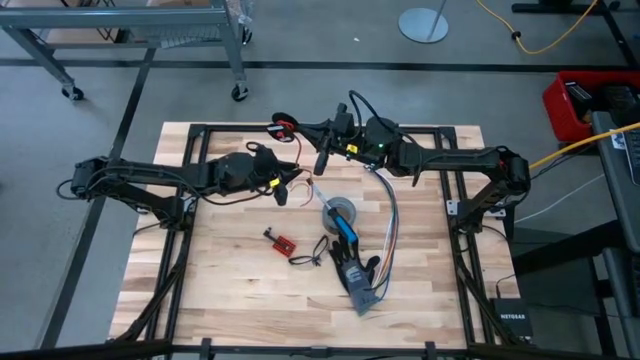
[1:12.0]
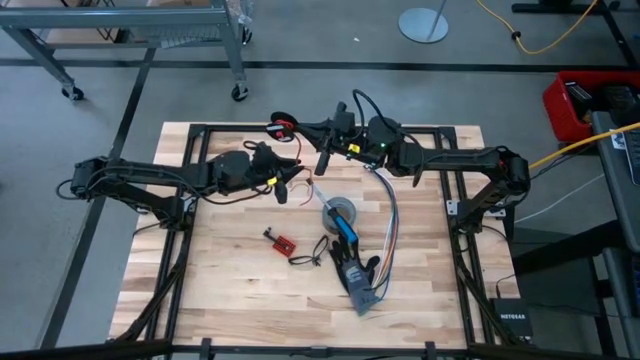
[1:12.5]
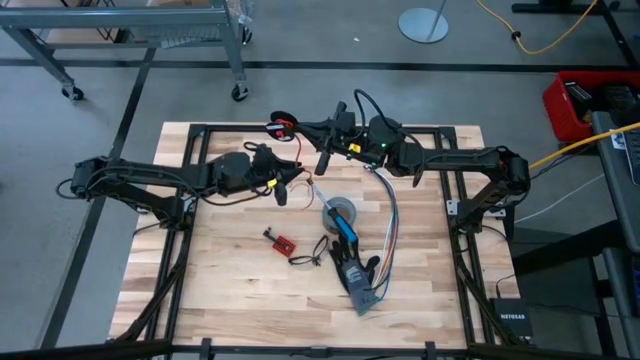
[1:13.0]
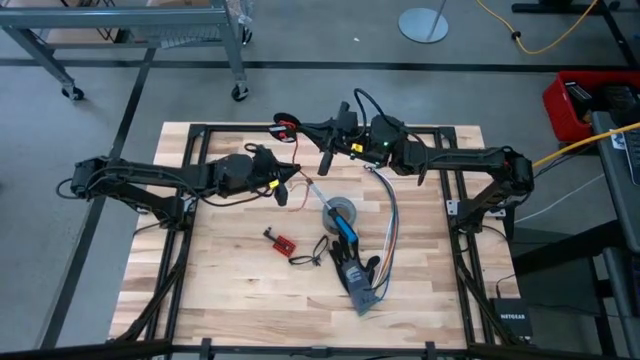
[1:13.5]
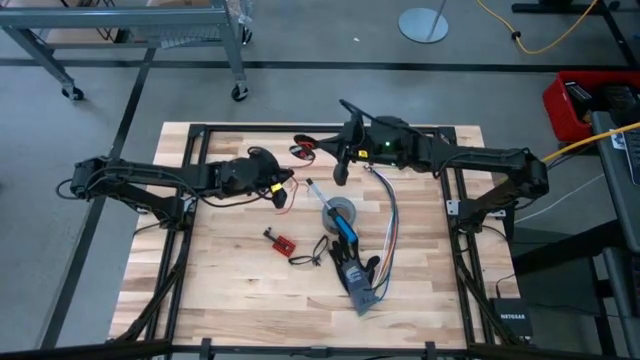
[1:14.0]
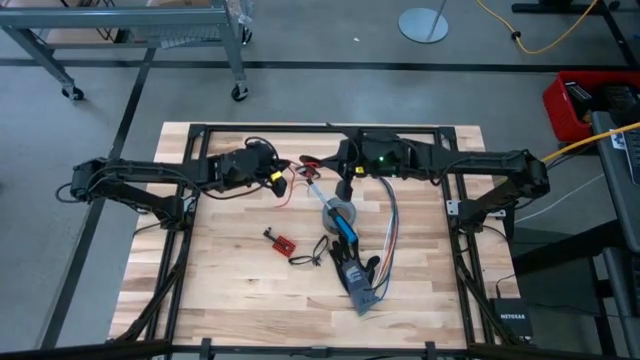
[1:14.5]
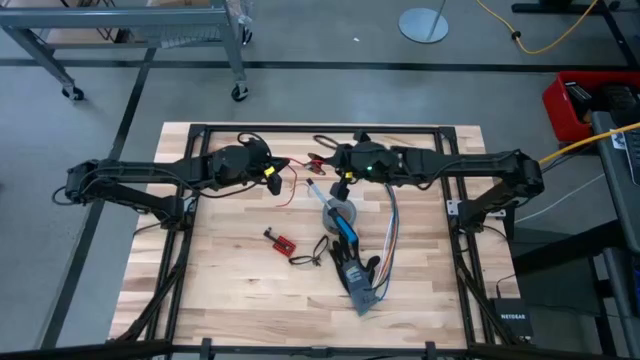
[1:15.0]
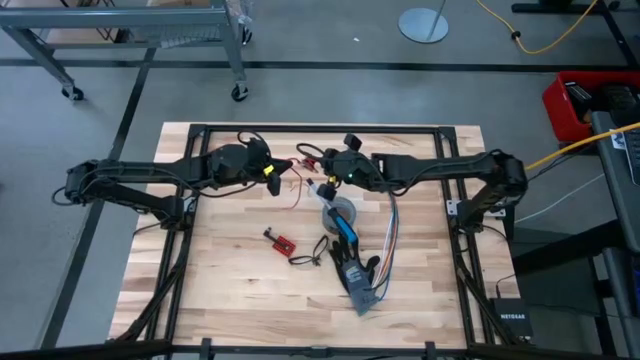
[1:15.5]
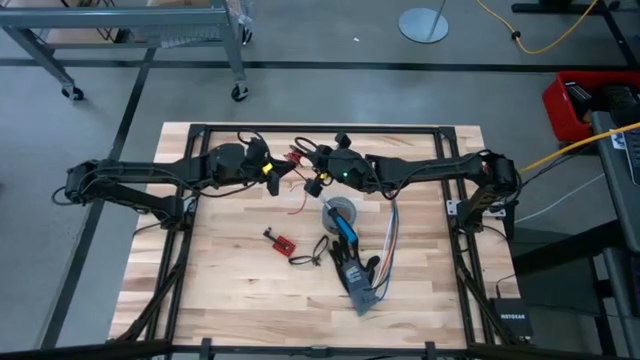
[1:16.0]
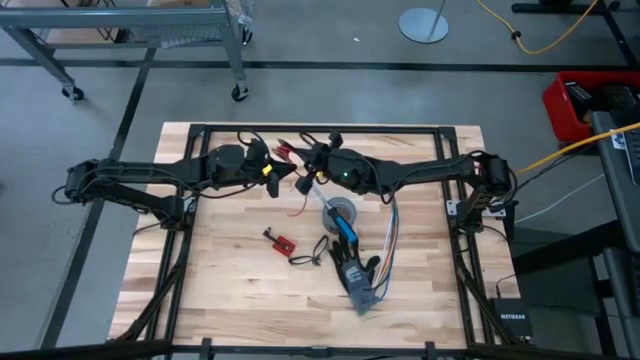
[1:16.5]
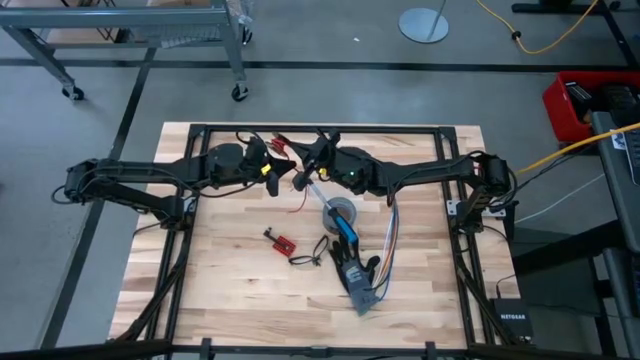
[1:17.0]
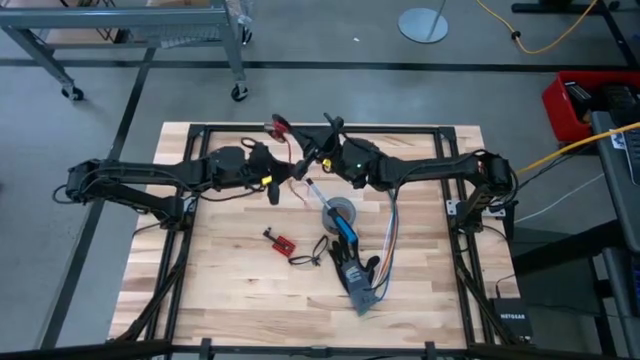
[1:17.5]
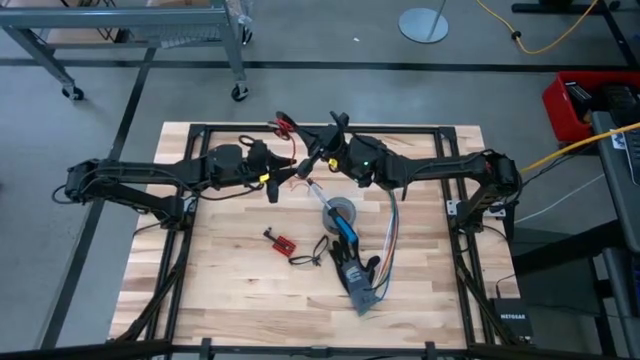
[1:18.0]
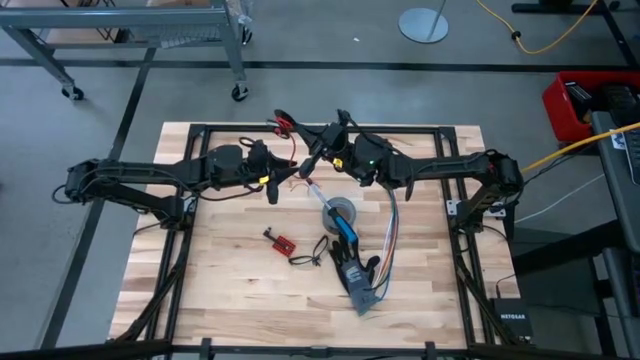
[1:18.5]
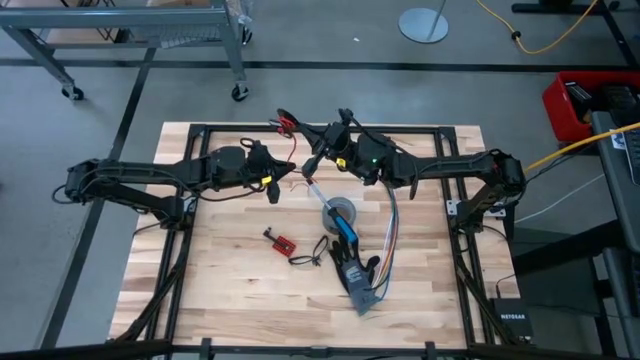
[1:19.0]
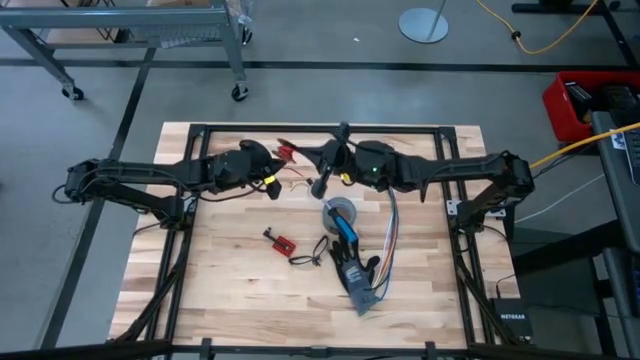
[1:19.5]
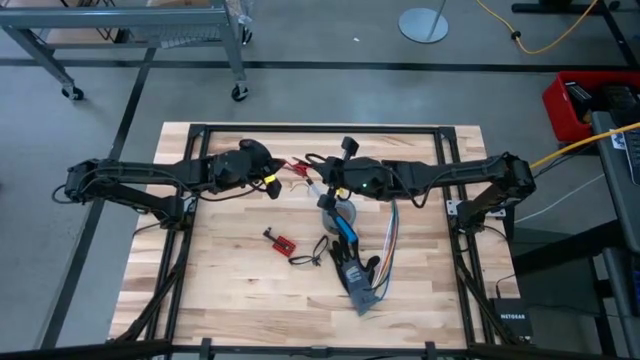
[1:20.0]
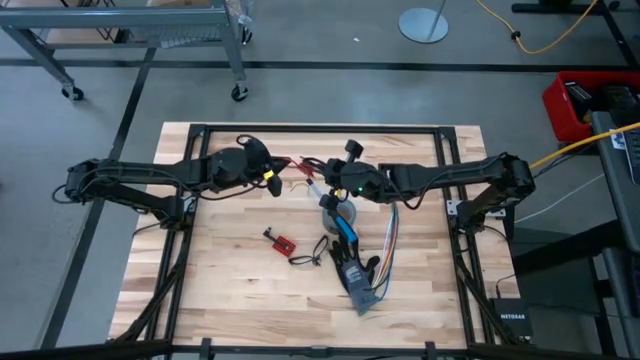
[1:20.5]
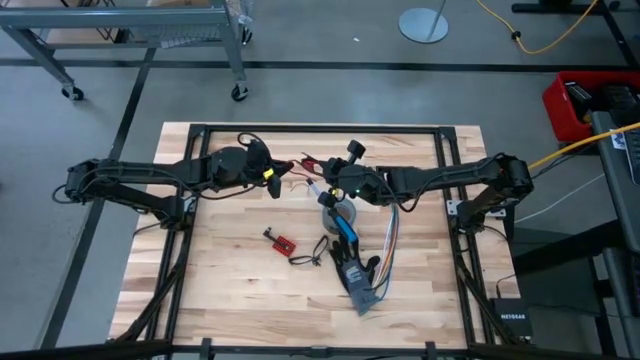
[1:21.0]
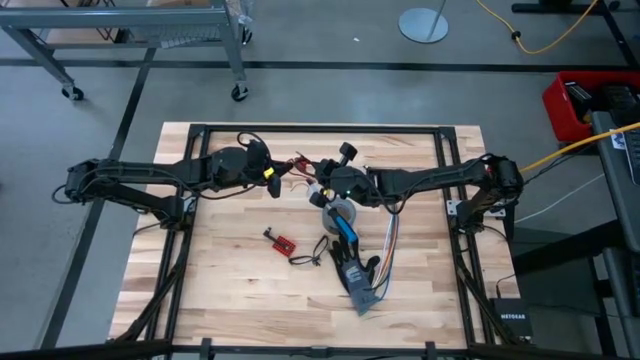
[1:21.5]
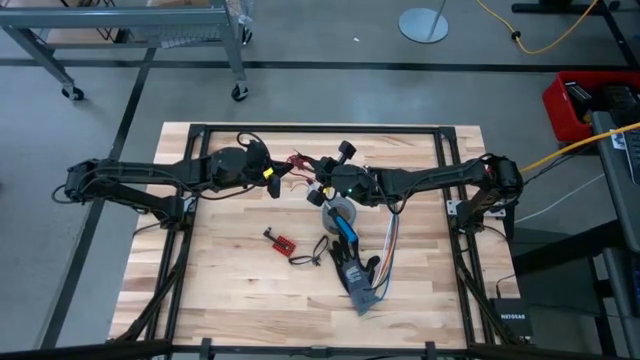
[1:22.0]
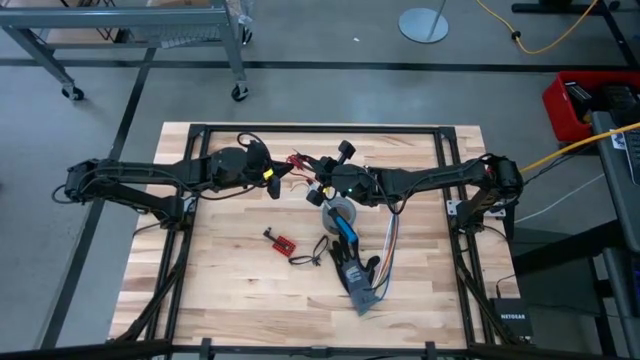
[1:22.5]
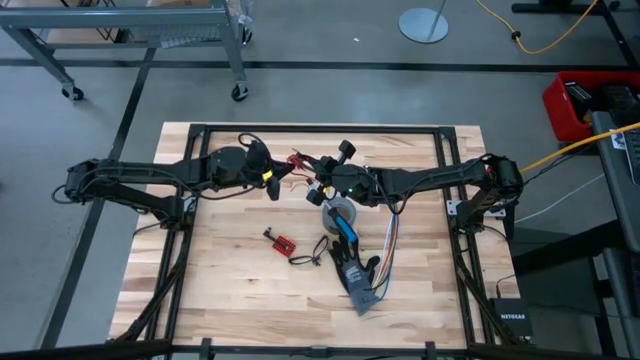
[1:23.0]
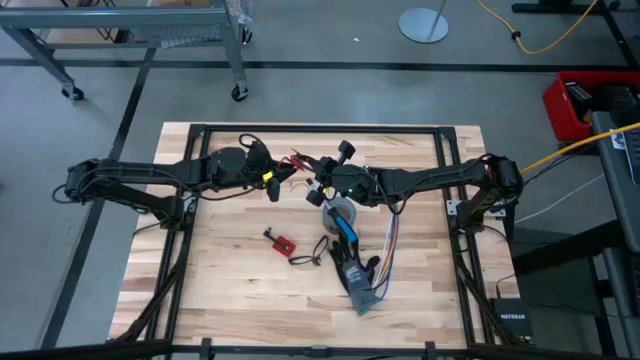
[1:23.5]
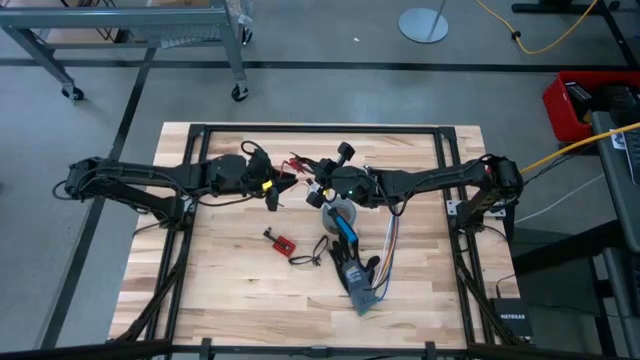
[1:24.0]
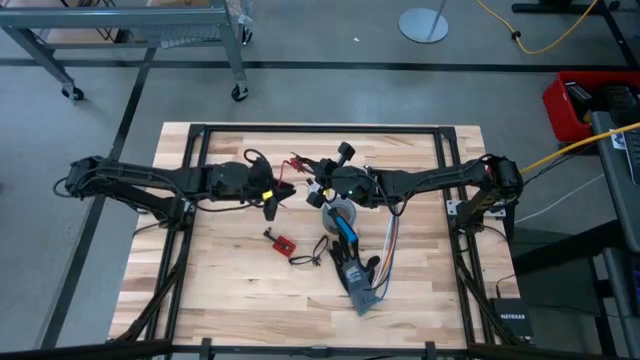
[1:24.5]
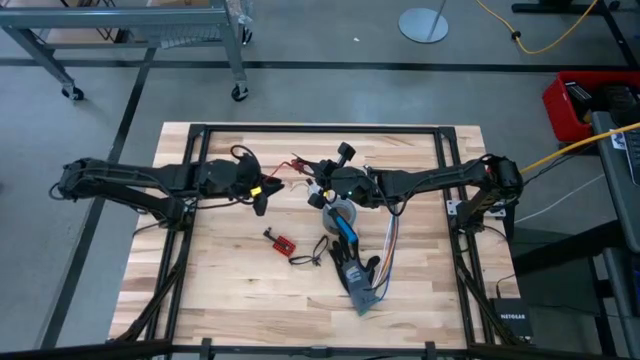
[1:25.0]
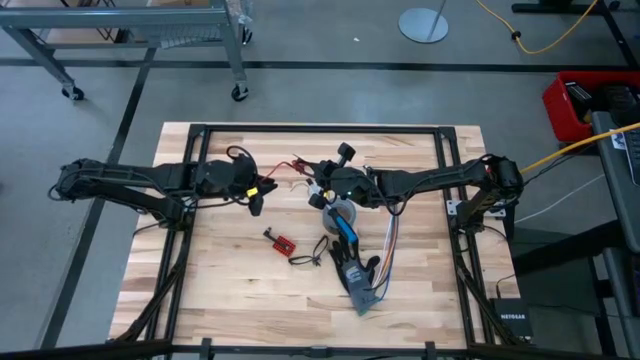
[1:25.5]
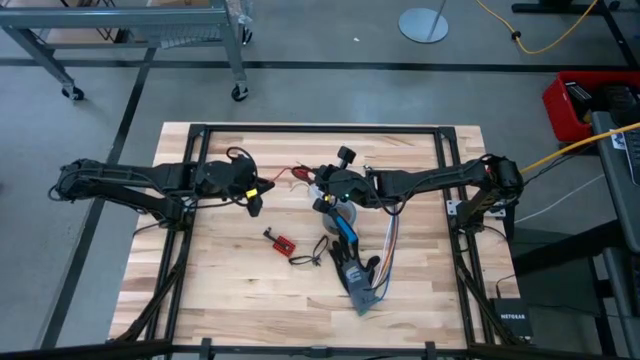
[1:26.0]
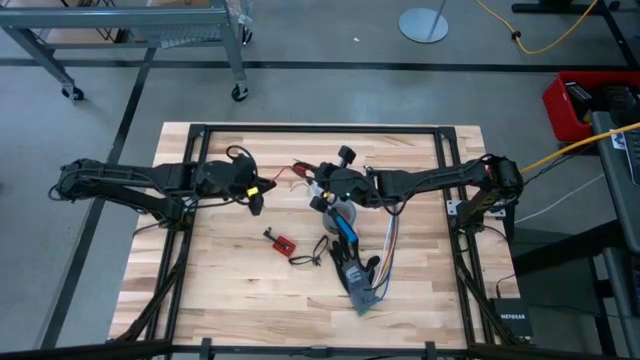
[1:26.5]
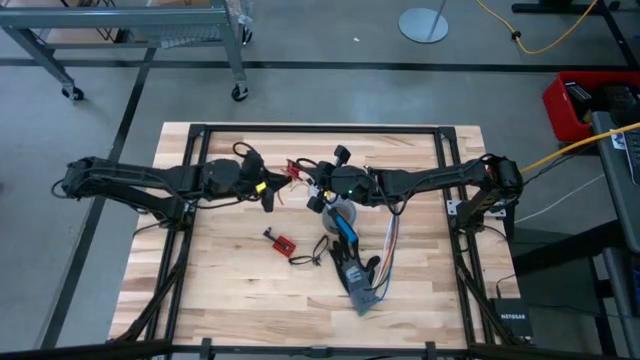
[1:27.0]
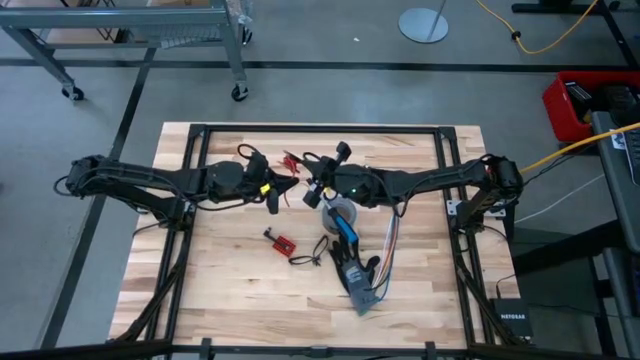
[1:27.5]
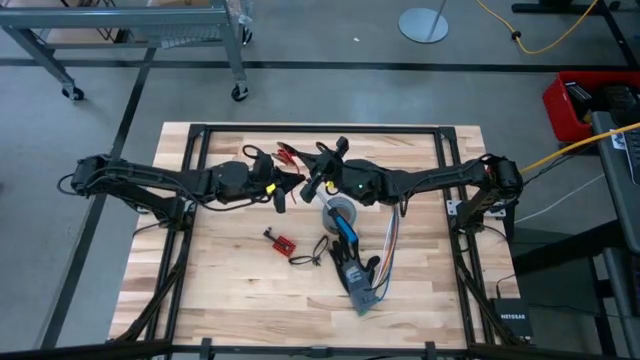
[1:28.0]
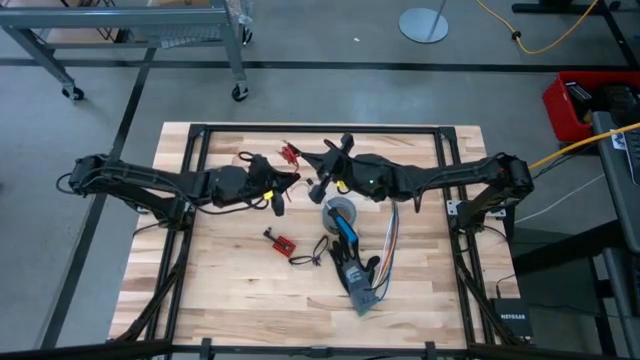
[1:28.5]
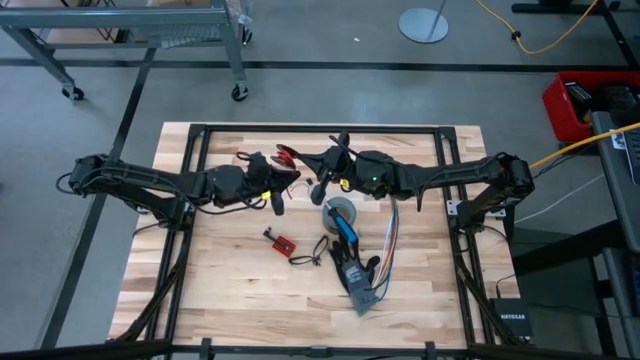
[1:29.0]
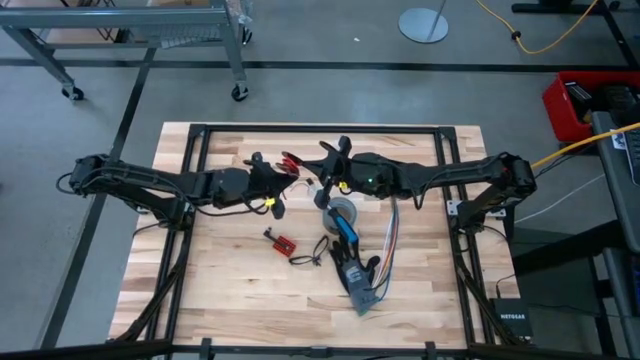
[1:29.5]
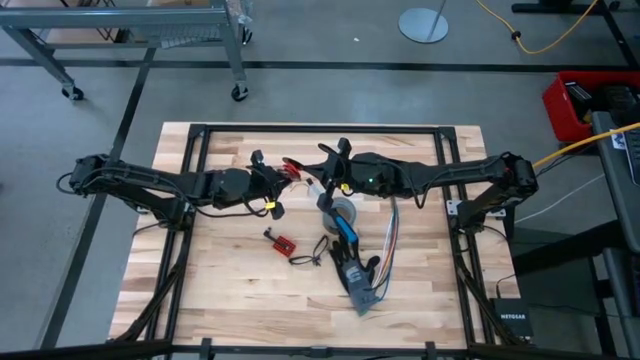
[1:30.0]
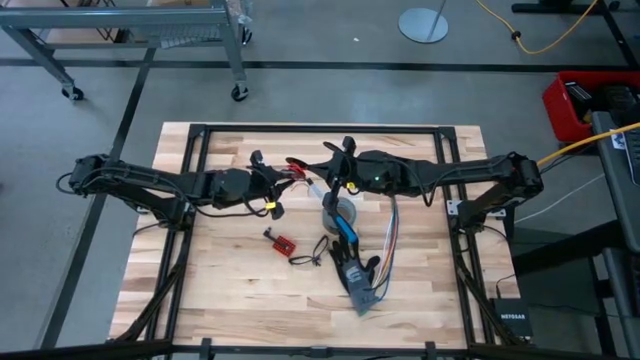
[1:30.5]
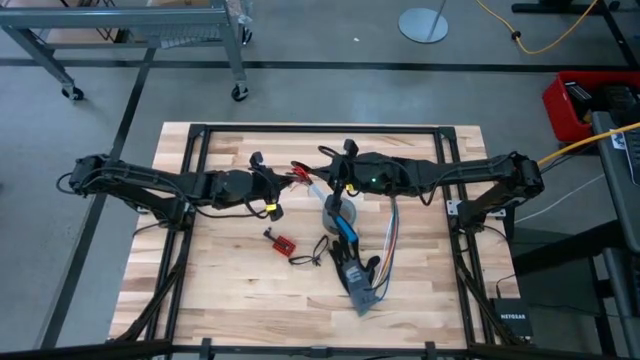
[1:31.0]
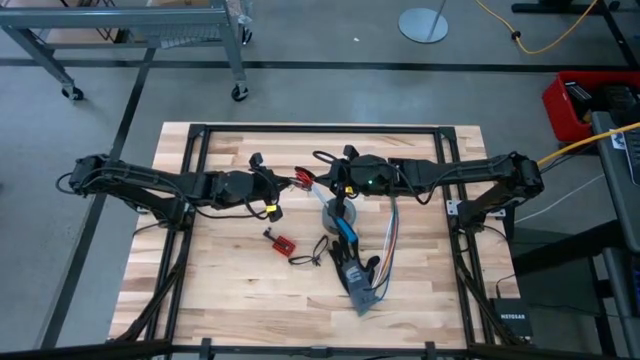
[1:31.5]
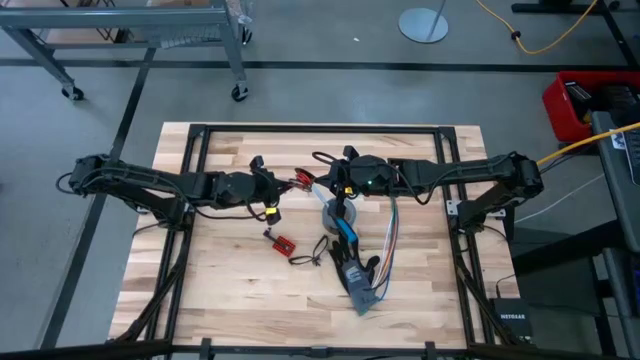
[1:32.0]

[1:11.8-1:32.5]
Task: Coil cords
Coil the red wire around the spool
